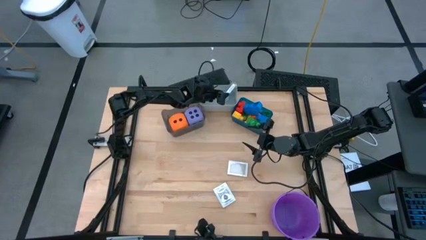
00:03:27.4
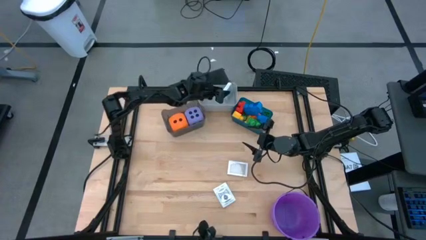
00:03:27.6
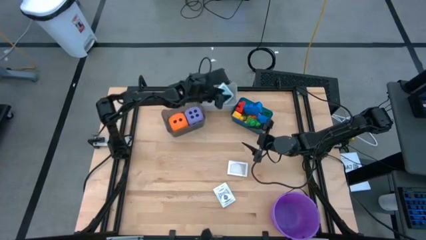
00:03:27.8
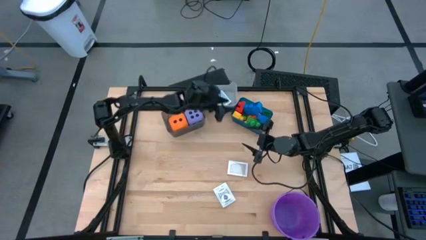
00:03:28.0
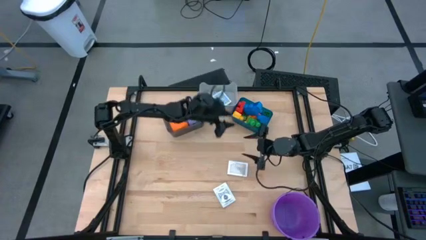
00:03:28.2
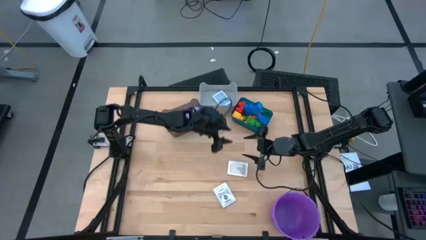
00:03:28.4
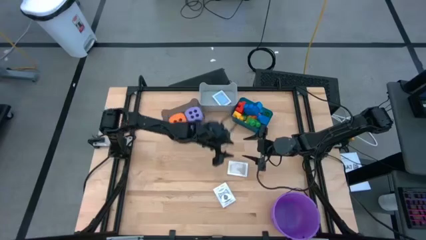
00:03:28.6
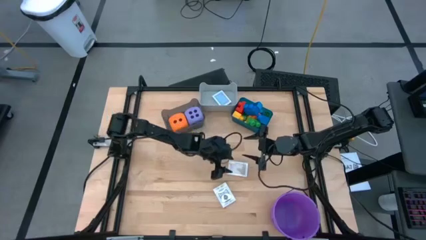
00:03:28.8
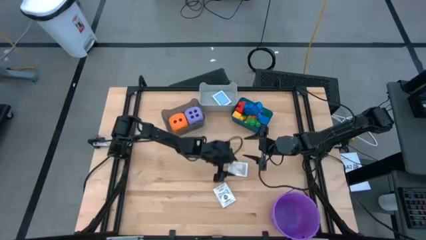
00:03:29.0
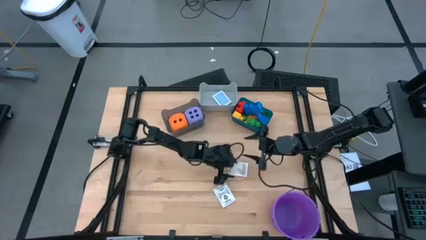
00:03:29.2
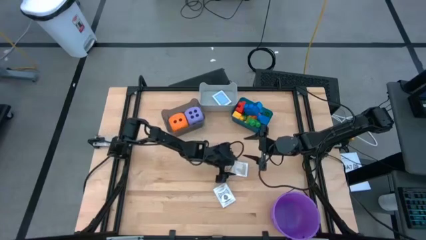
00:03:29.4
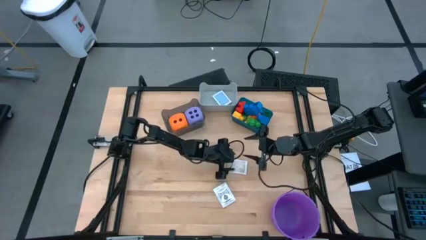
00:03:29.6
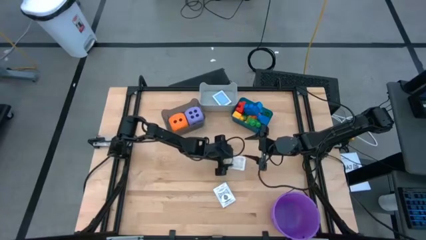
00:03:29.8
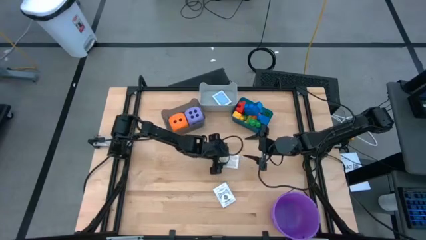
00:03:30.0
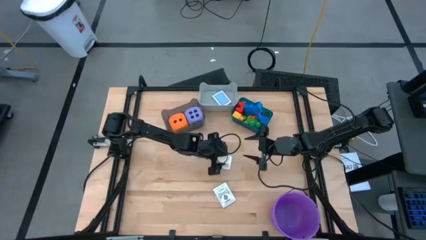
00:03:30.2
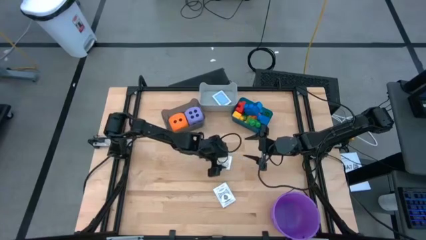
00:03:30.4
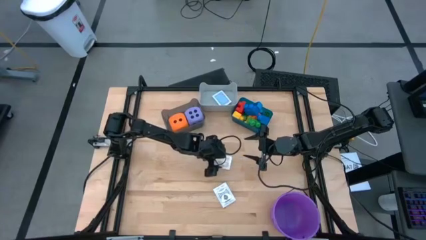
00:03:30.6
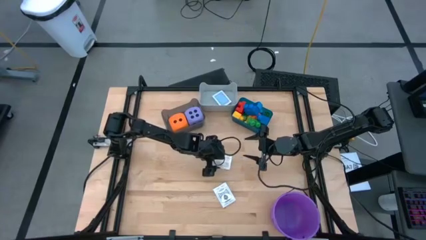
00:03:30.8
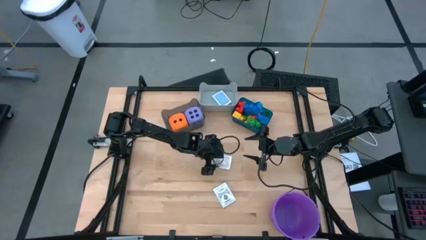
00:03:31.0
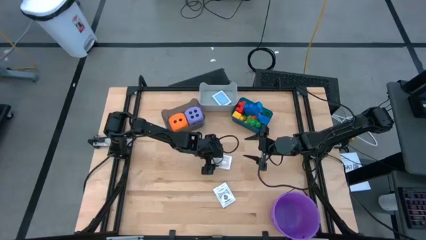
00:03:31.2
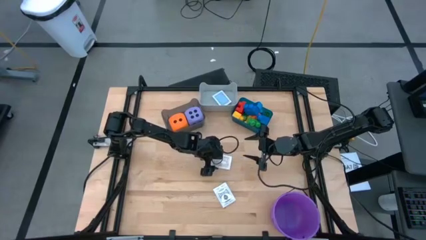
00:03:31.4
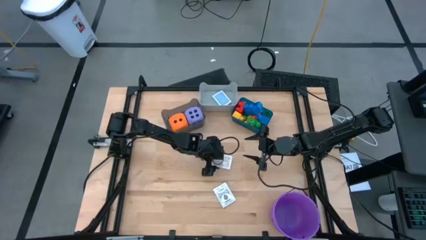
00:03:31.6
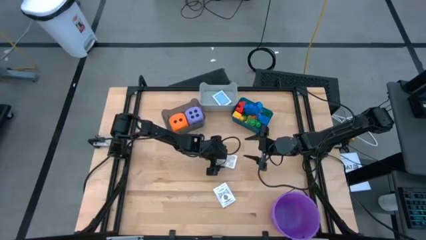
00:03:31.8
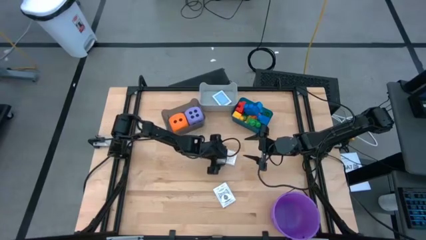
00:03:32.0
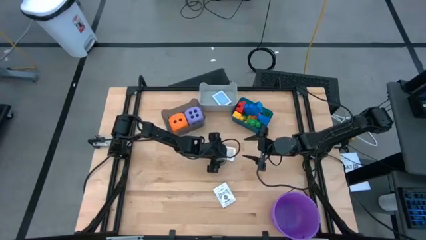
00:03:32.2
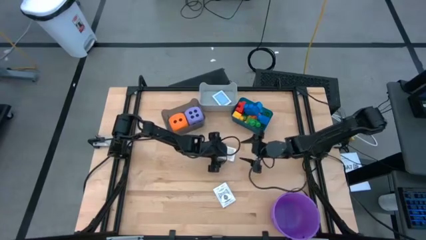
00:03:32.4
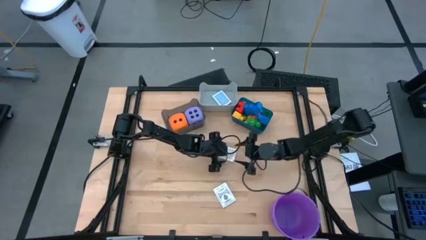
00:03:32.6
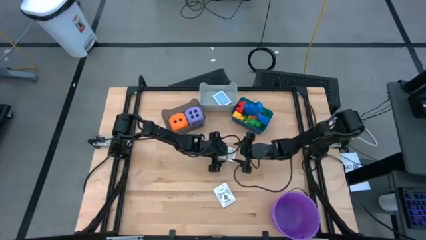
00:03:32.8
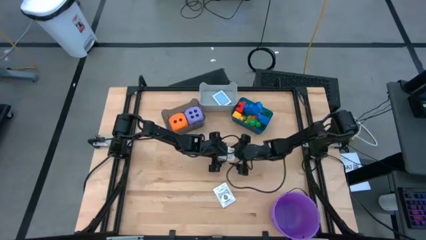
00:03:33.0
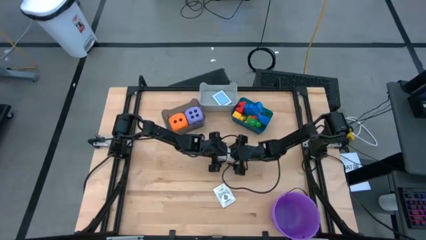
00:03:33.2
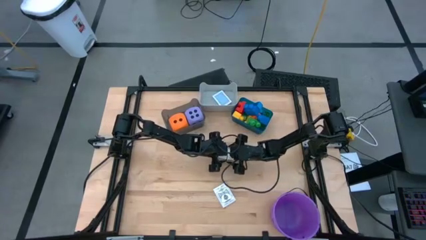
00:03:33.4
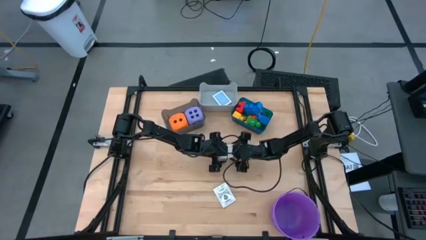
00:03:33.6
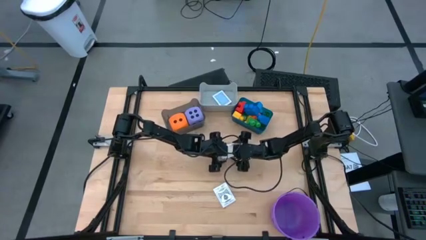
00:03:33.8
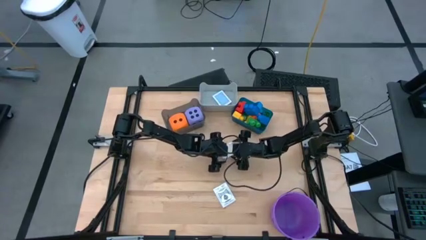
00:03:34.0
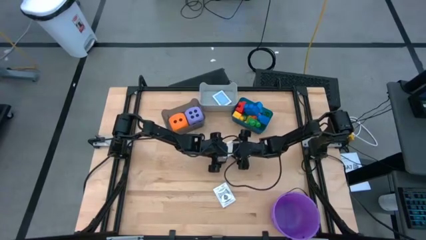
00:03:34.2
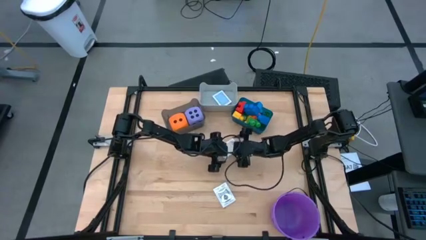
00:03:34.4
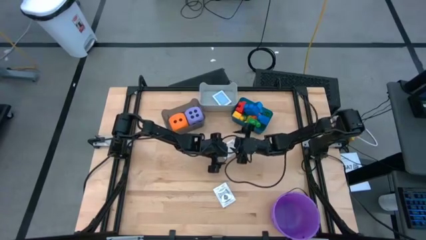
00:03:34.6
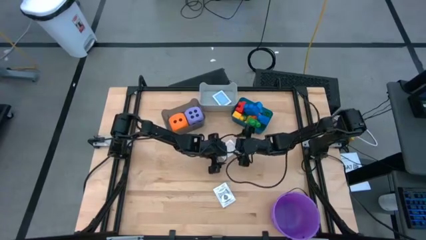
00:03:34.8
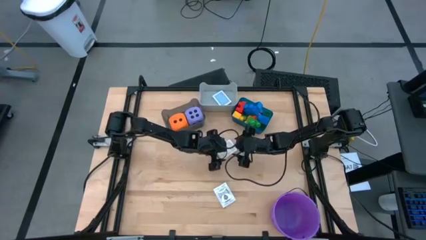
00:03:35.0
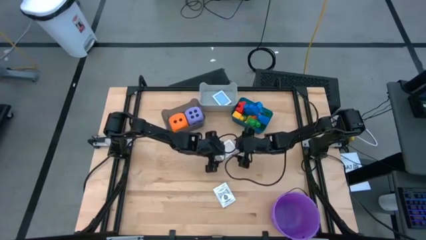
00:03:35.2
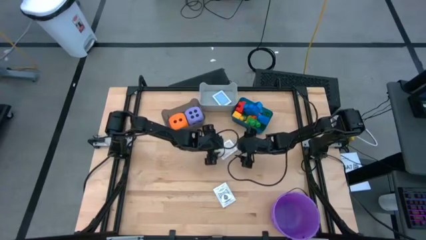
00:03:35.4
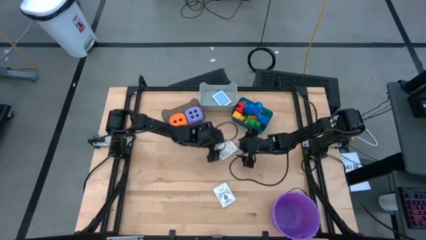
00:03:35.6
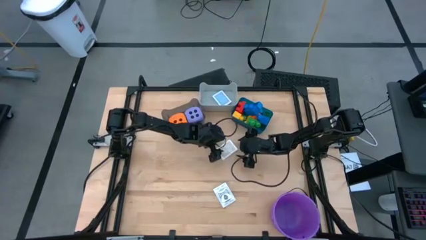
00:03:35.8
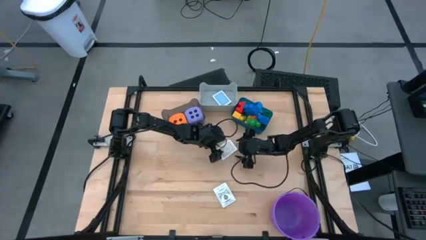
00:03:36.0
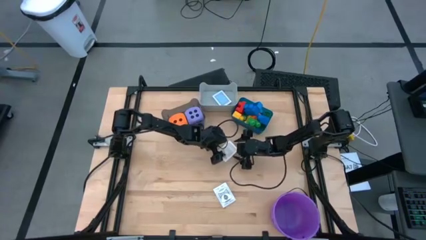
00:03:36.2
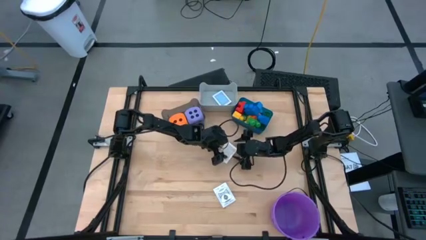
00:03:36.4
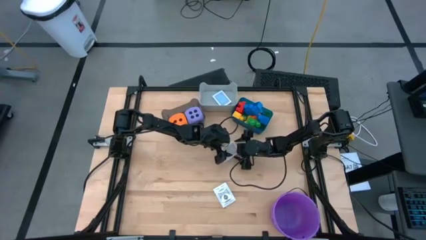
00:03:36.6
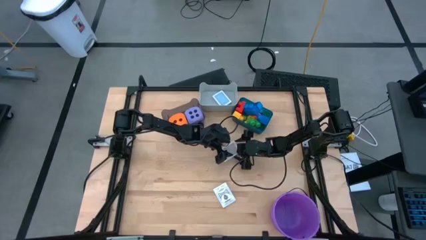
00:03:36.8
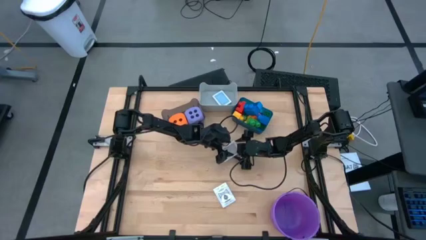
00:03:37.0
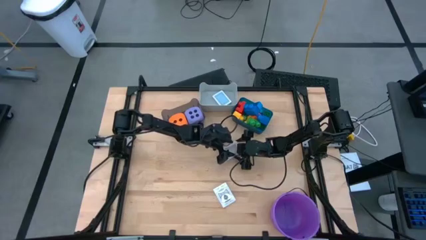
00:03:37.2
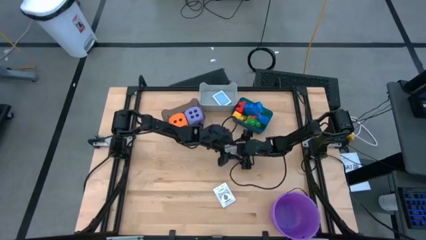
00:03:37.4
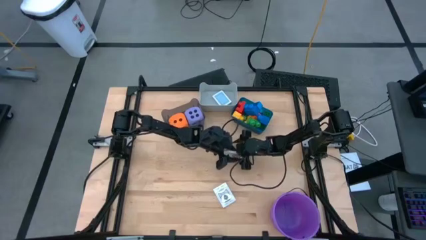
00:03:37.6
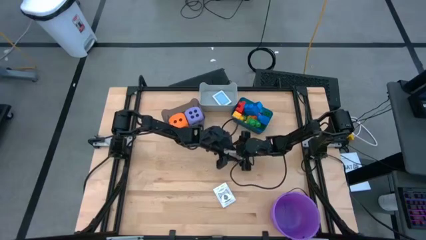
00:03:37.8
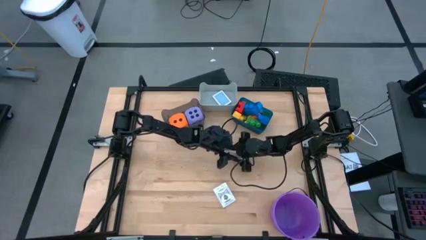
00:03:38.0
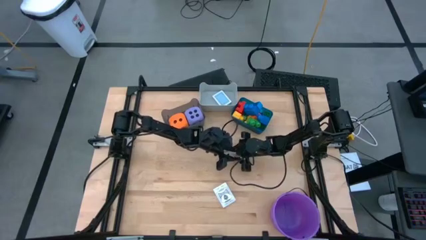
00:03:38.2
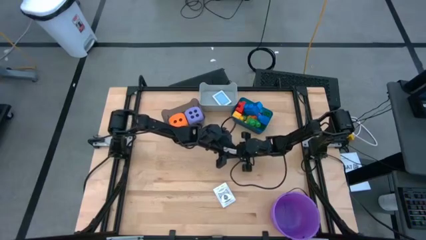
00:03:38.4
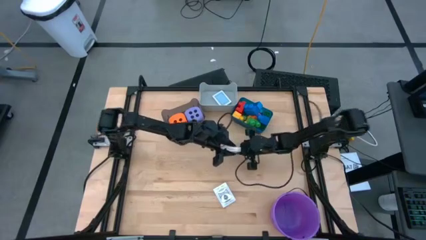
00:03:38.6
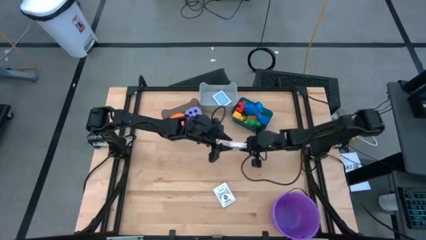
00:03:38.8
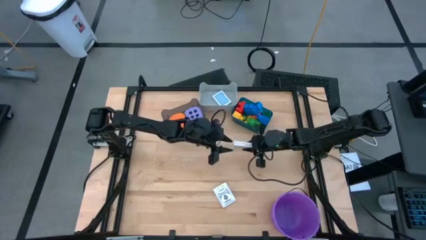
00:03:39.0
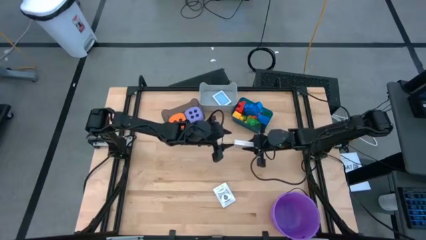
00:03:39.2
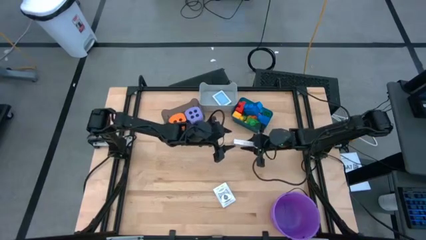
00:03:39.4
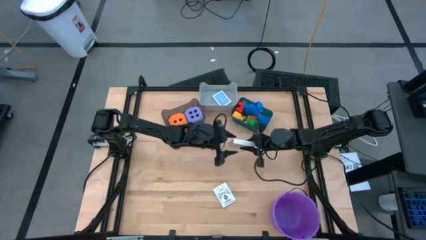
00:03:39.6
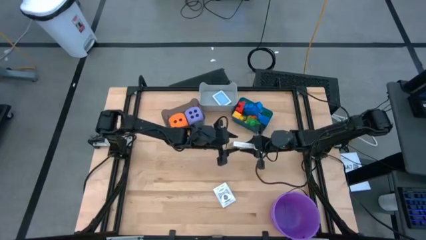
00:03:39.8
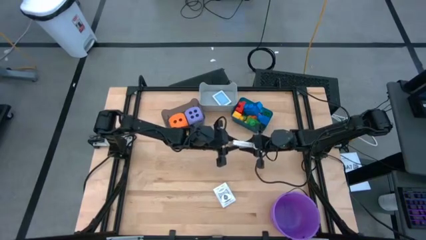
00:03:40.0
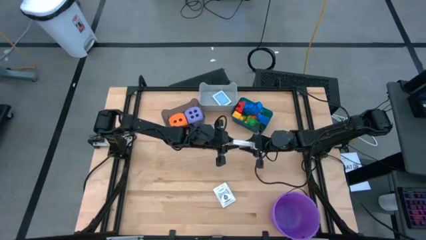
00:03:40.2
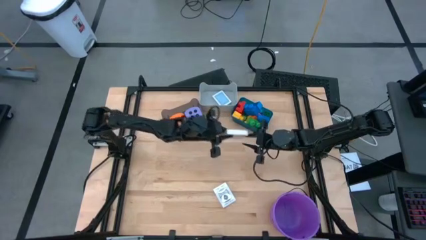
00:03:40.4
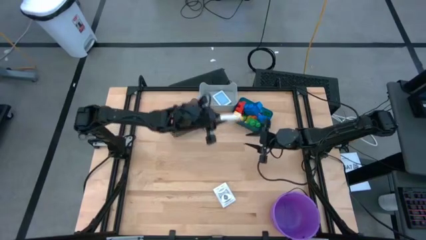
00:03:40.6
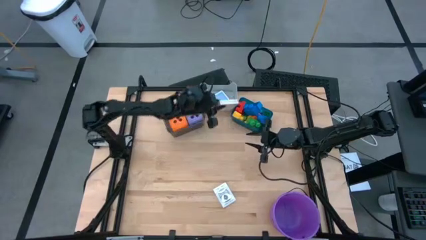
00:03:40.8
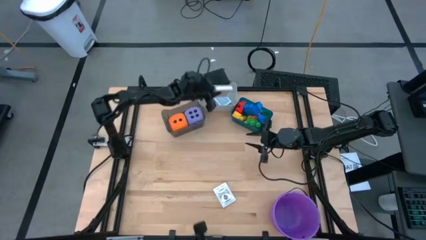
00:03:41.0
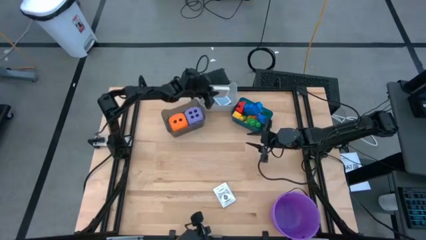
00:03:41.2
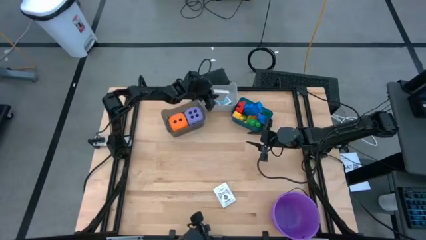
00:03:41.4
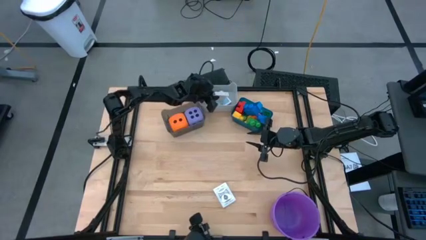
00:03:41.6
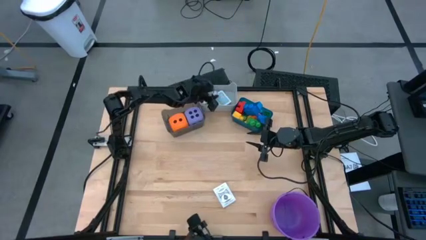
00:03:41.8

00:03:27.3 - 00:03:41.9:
Task: Pick & Place Toys
Put the brown deck of cards into the gray bin

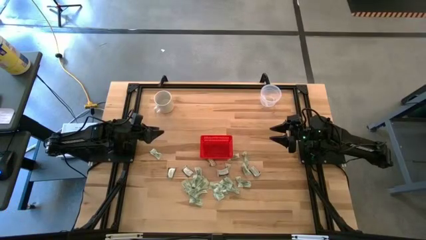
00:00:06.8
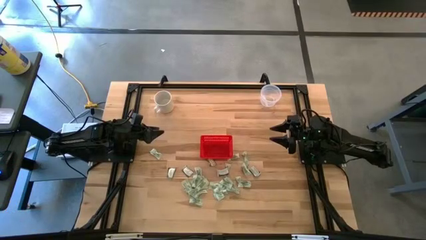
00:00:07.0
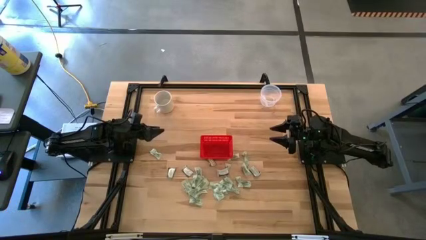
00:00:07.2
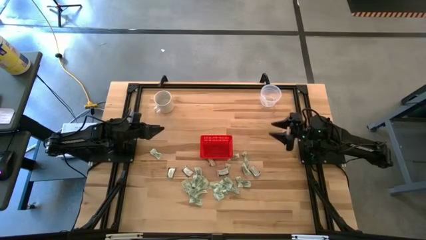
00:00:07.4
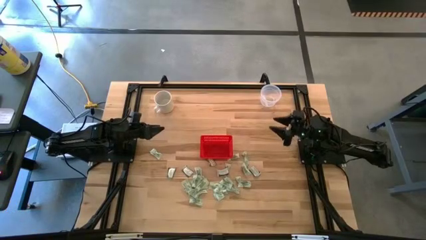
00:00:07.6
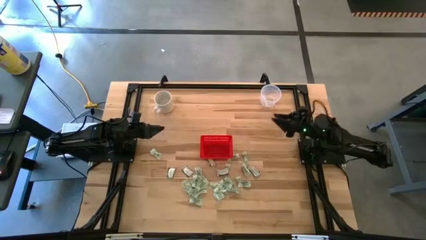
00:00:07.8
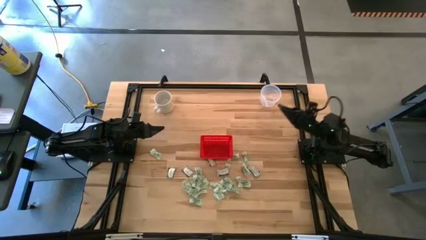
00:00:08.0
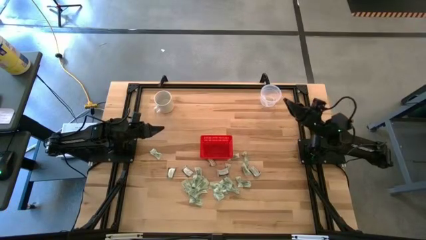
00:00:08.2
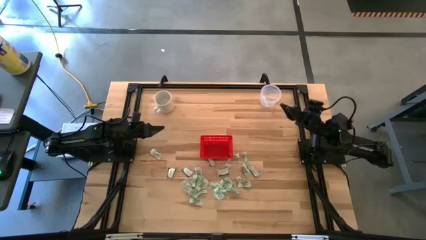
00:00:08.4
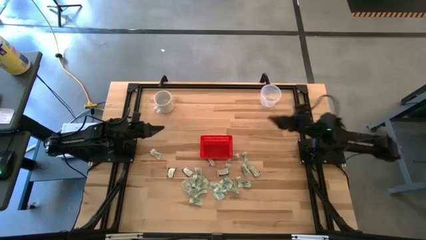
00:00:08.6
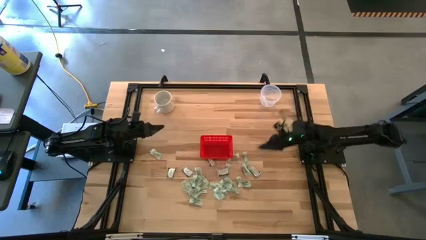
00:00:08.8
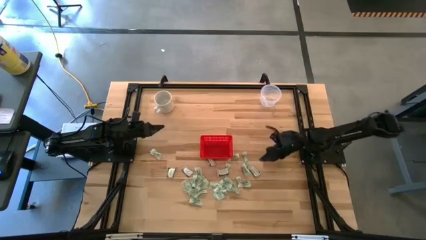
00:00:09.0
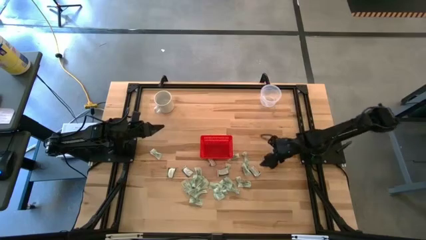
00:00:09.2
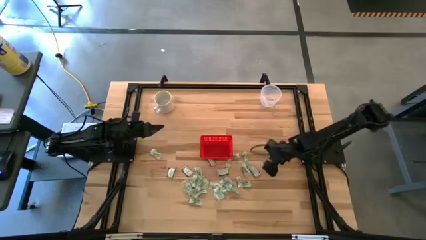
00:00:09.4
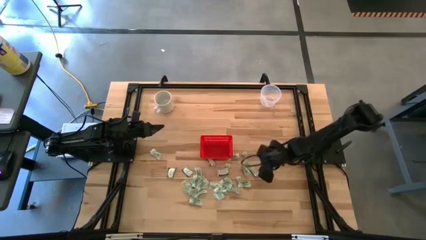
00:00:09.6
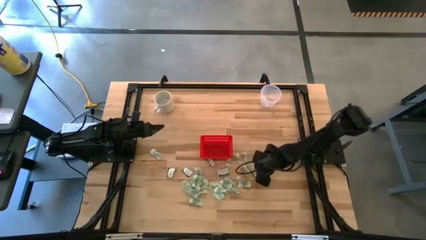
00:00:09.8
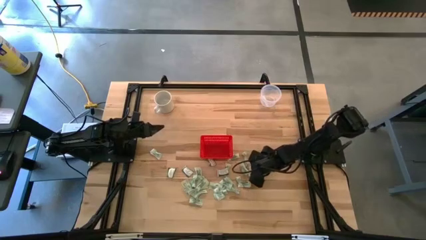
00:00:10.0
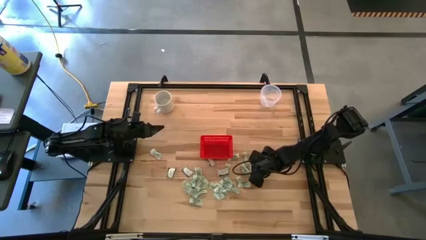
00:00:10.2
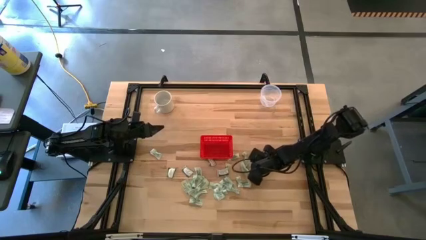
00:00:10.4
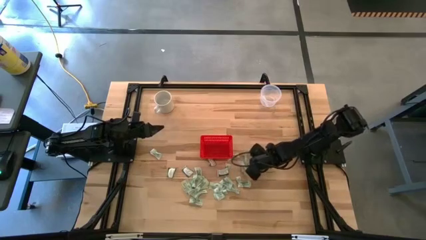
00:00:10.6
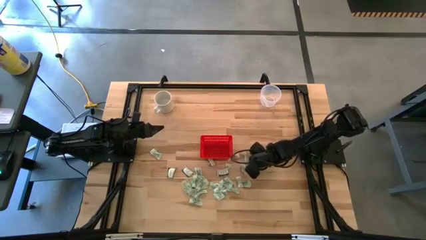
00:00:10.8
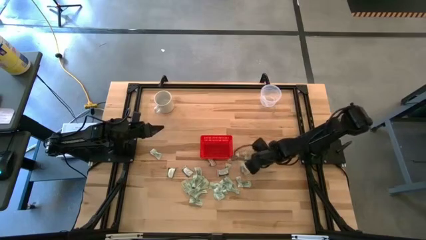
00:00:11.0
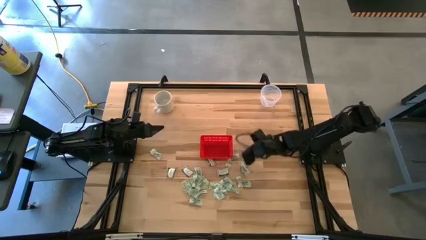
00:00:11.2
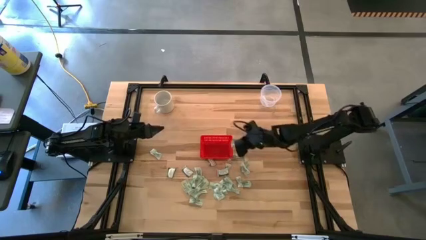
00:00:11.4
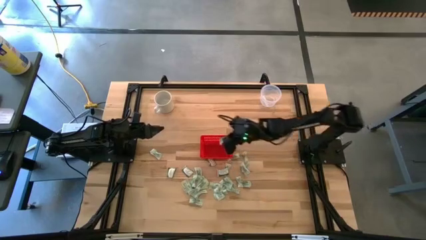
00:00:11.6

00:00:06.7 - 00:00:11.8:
Task: Pick and place items into bin
Put the truvia packet into the red bin
